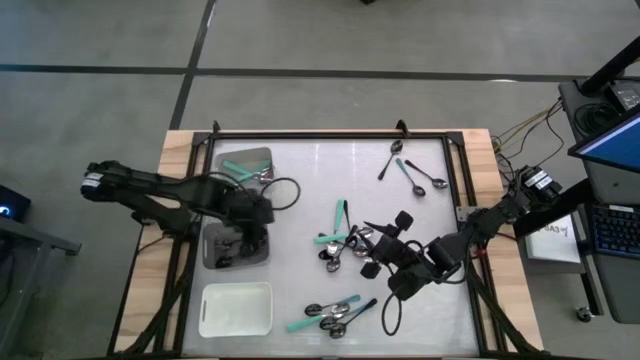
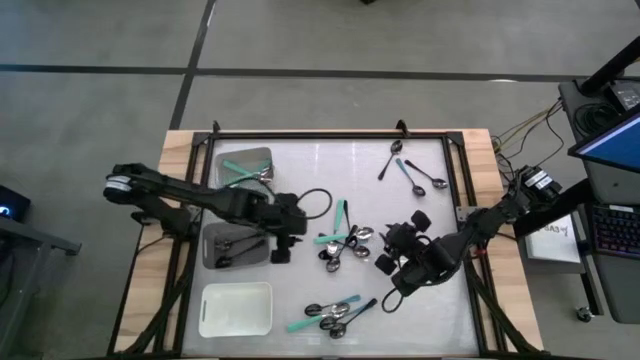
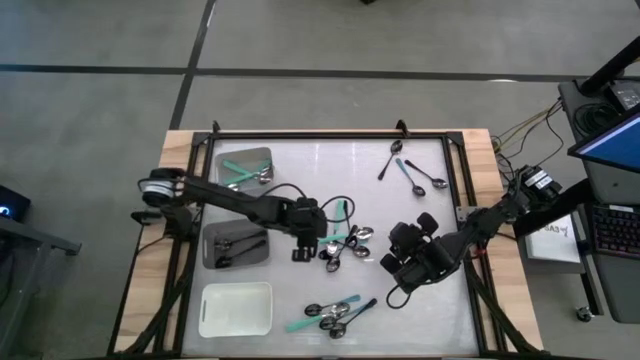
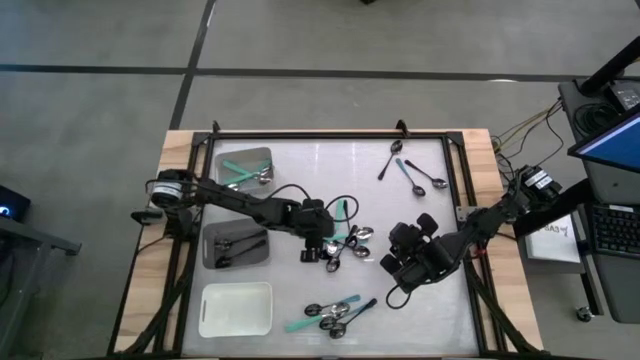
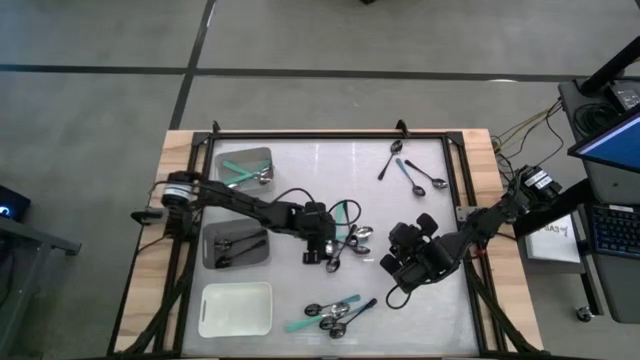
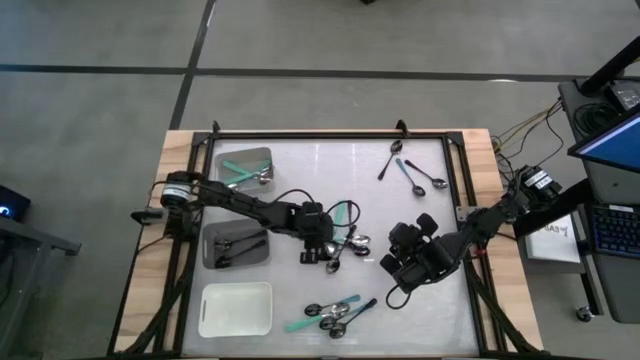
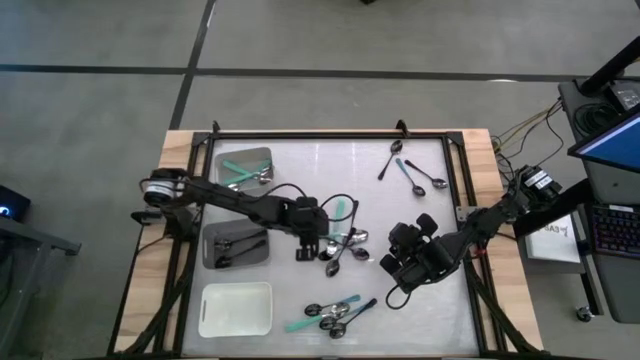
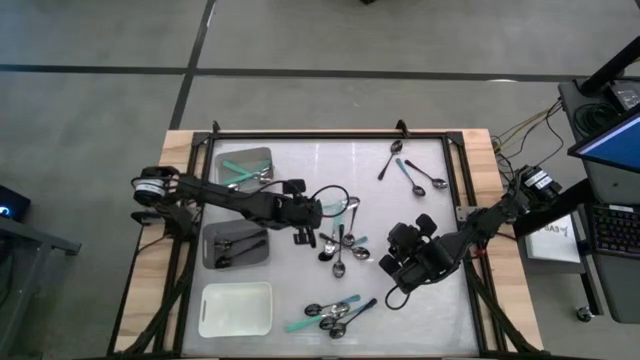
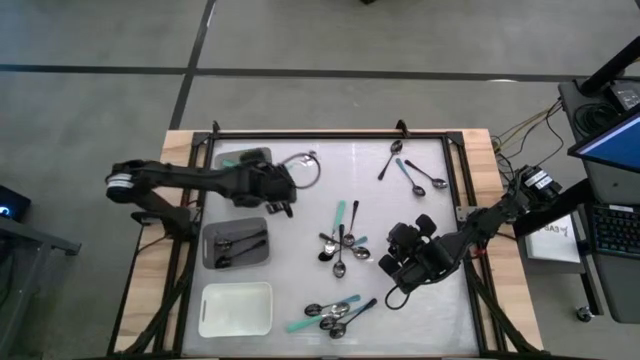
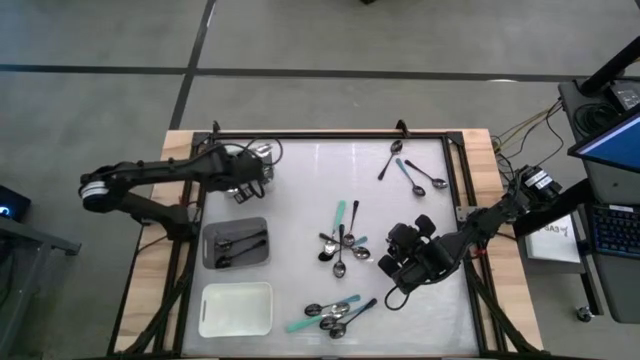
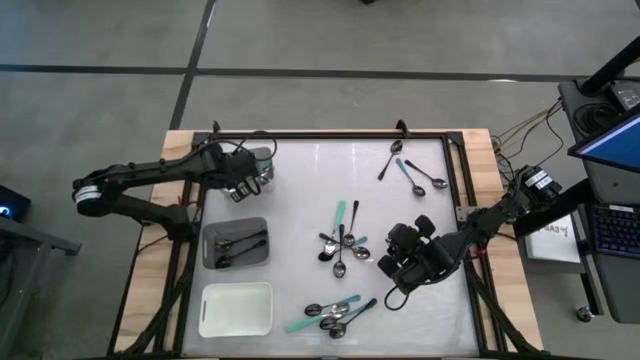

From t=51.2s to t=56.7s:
Task: Sort silverware by color (type)
Put the green spoon into the gray bin

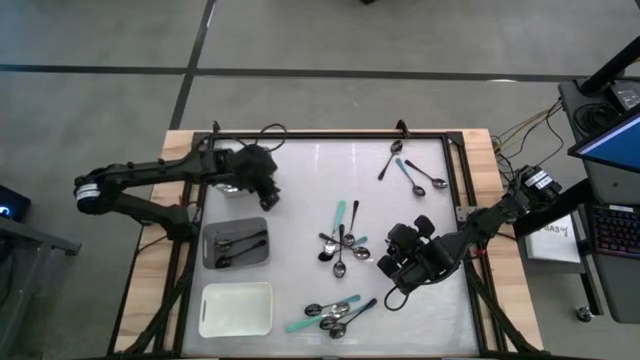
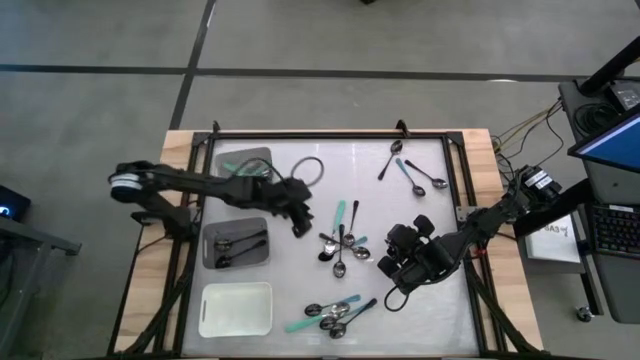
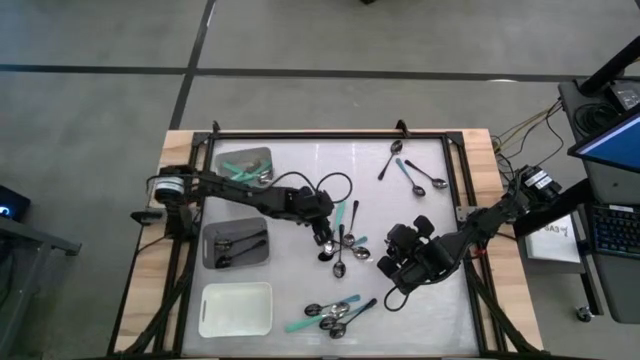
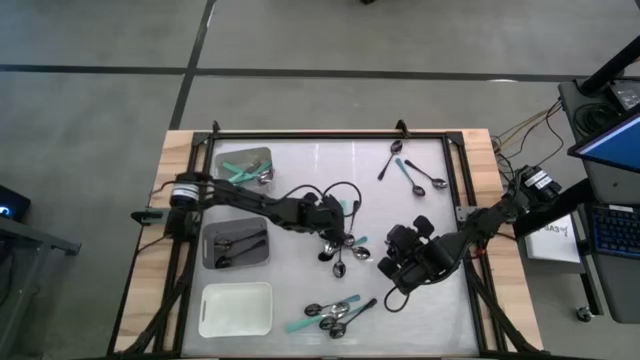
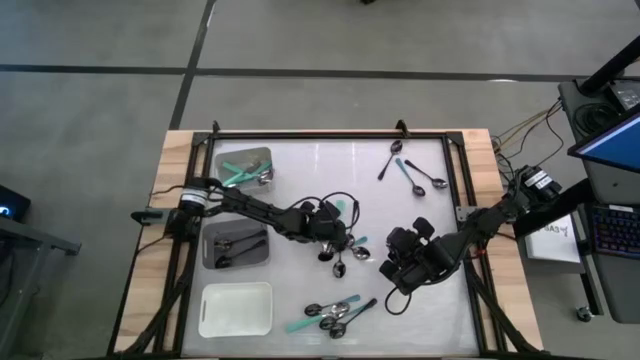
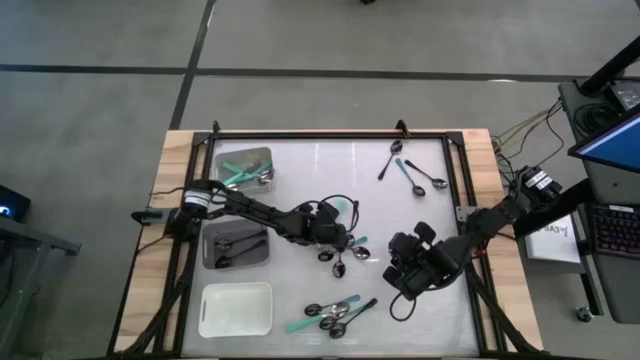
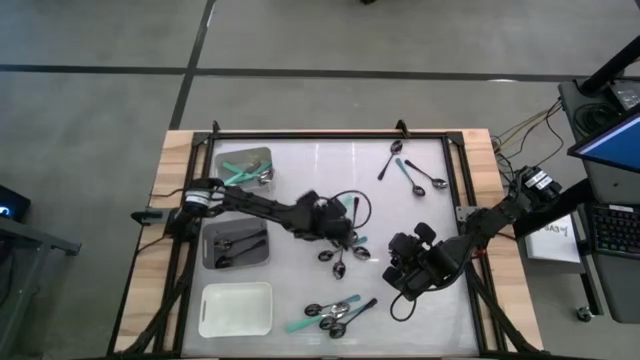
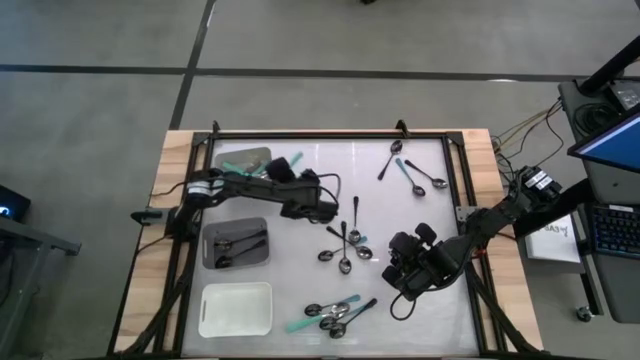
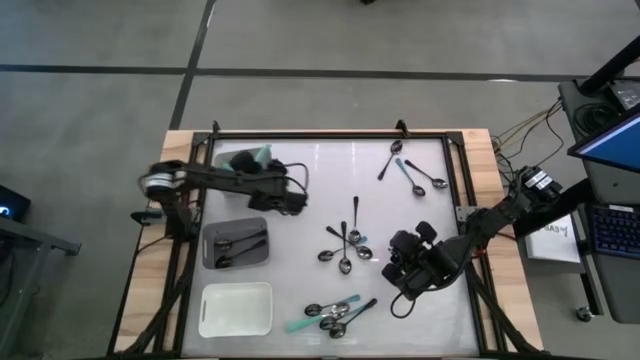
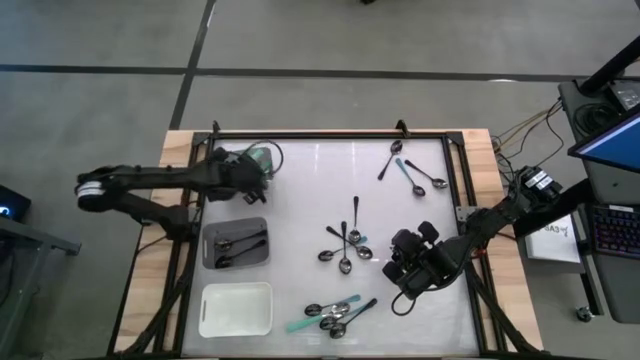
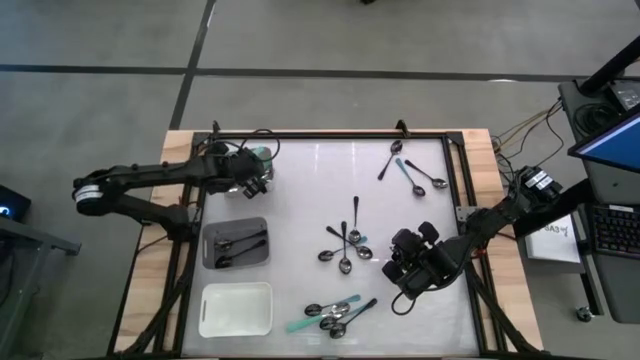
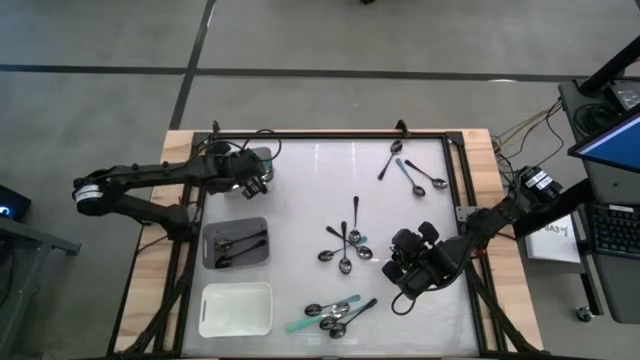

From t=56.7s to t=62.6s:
Put the green spoon into the gray bin

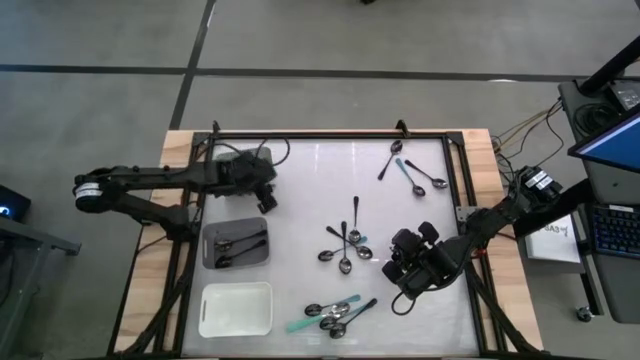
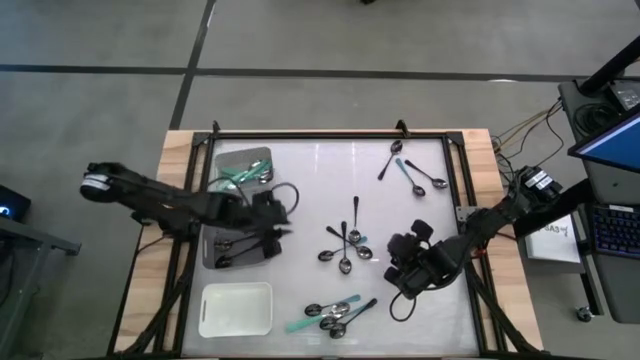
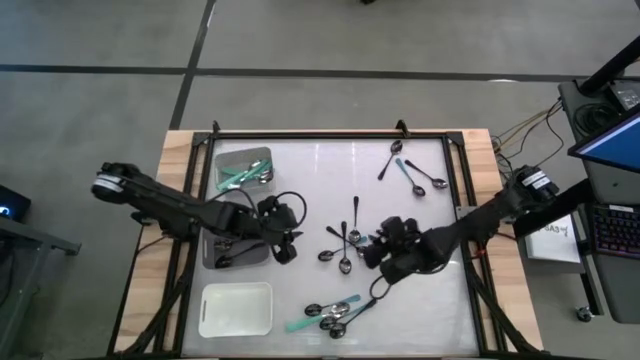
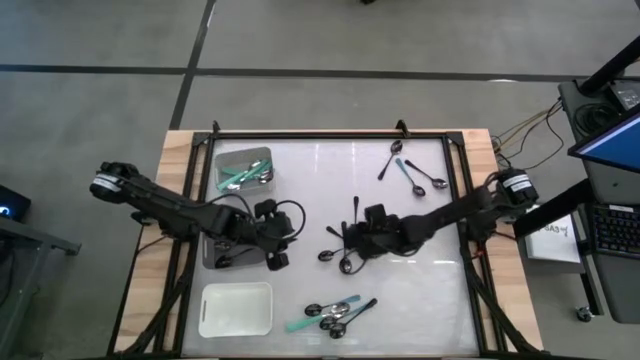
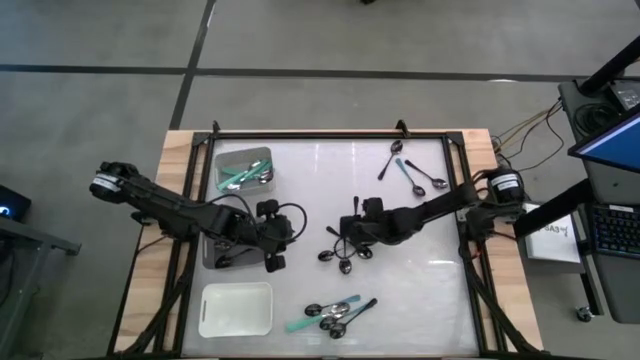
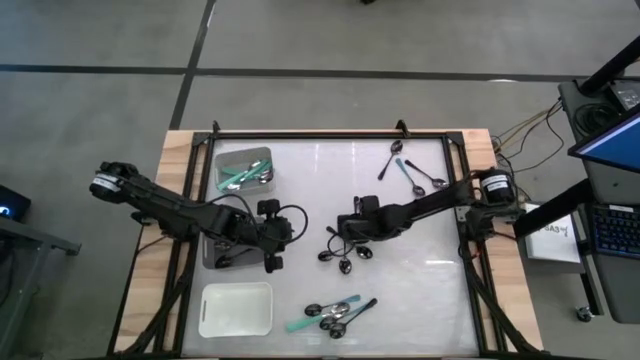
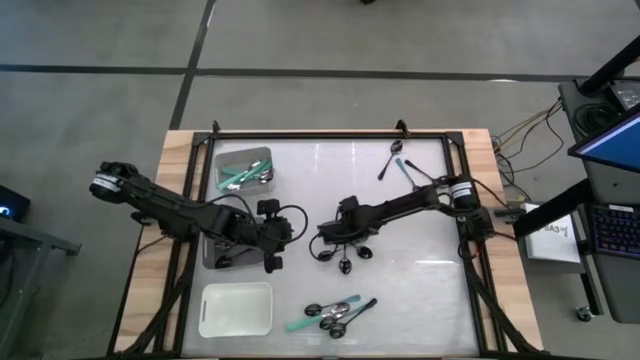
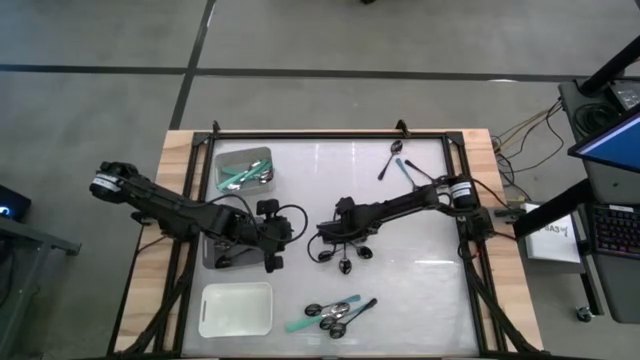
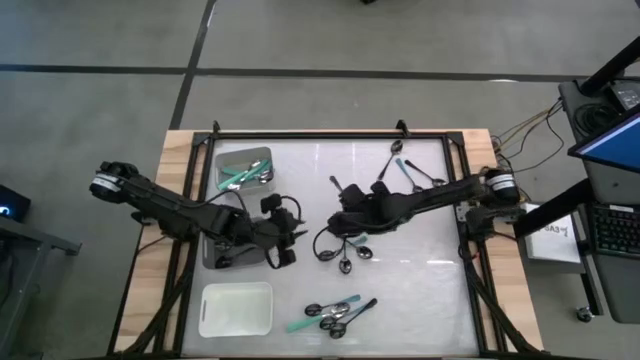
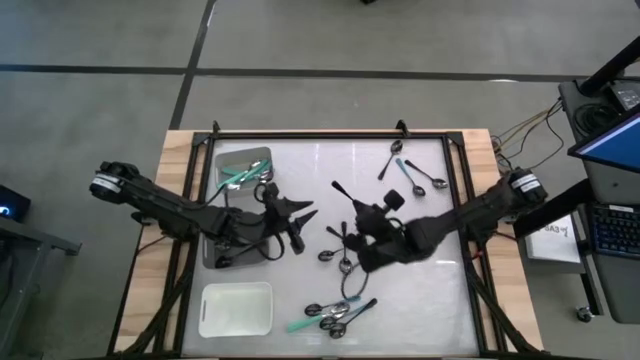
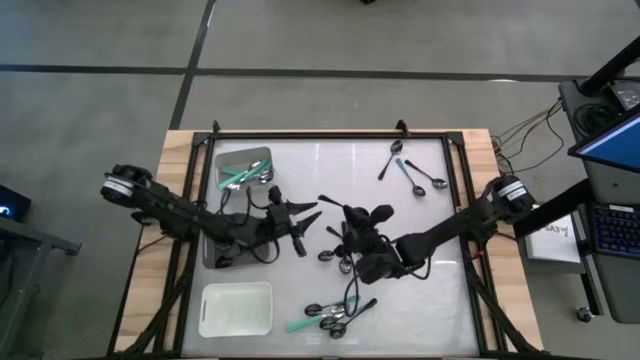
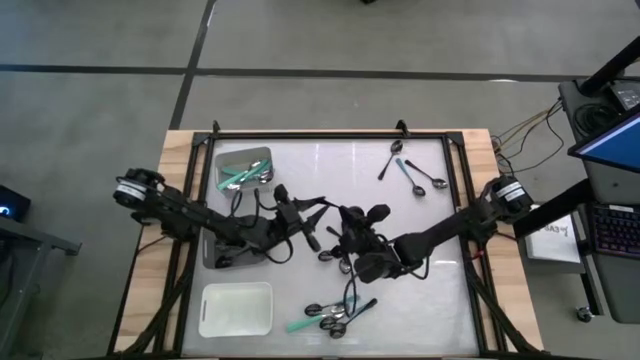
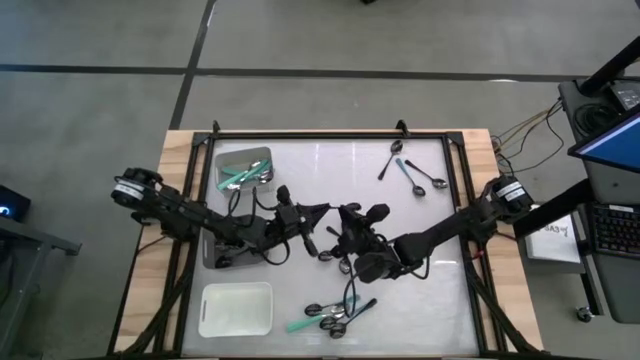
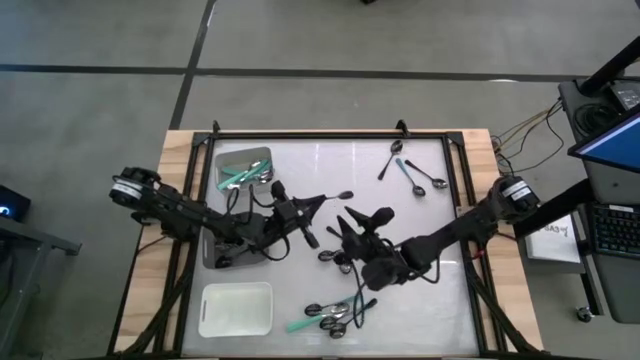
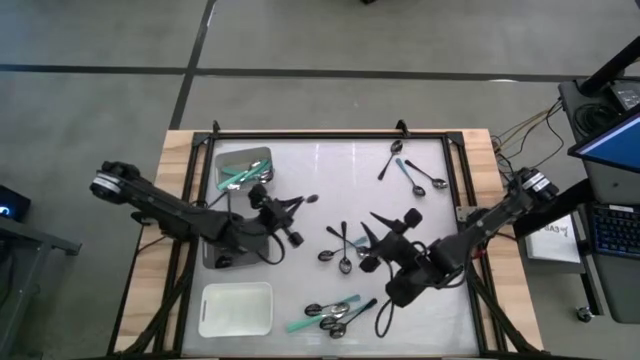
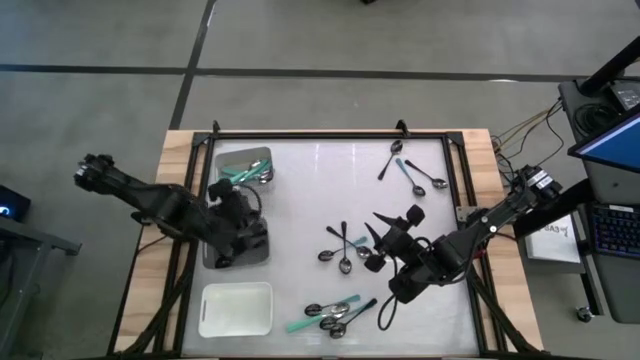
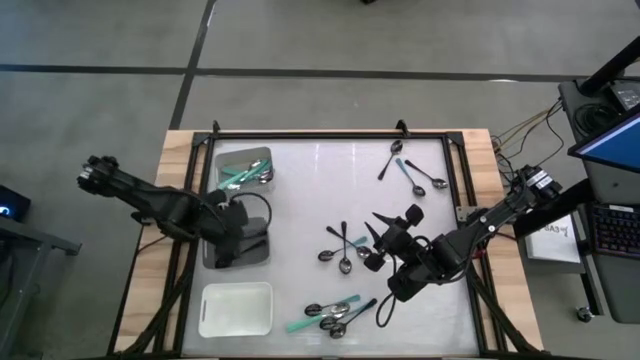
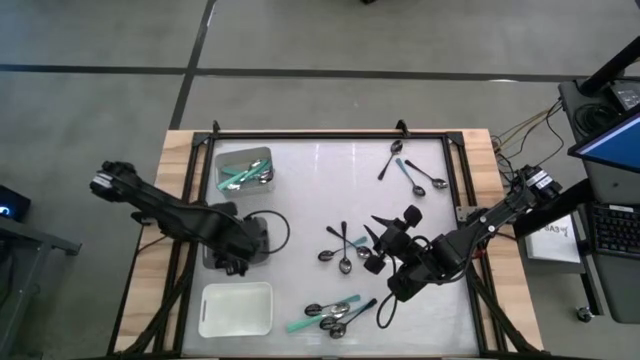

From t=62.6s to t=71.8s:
Put the black spoon into the black bin
